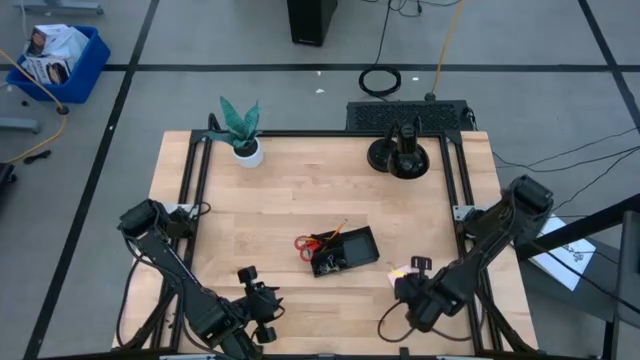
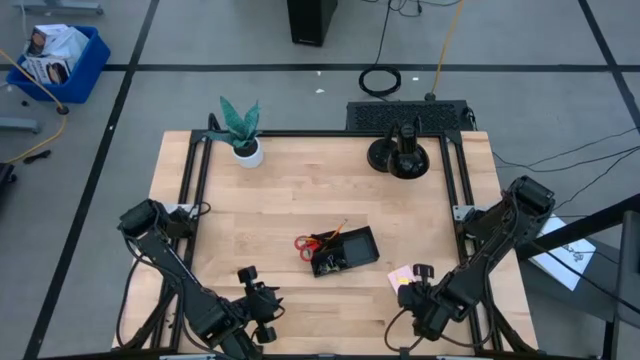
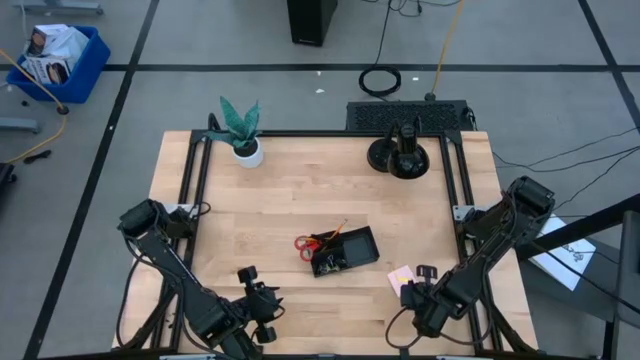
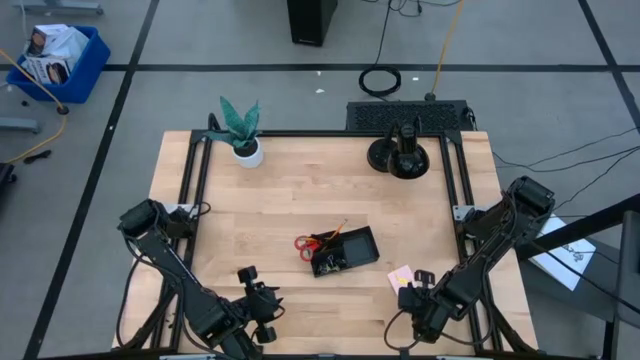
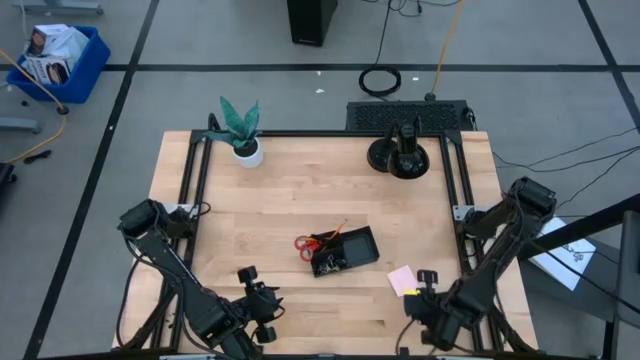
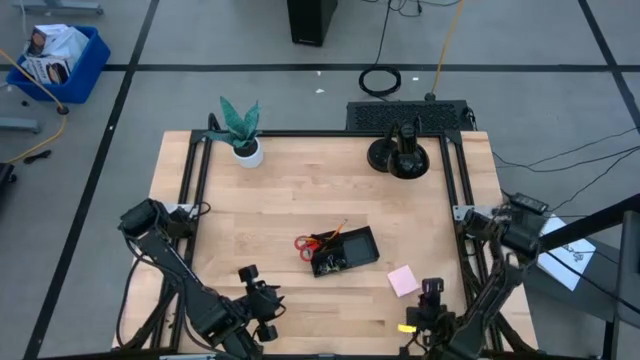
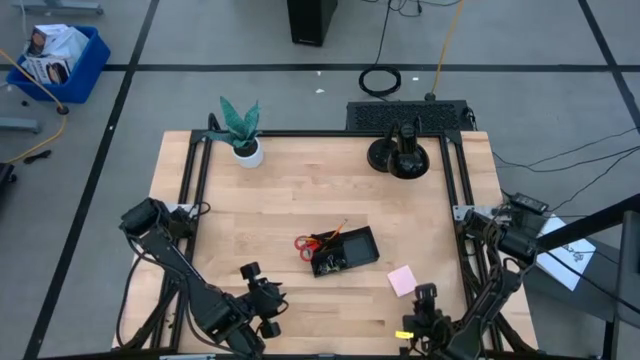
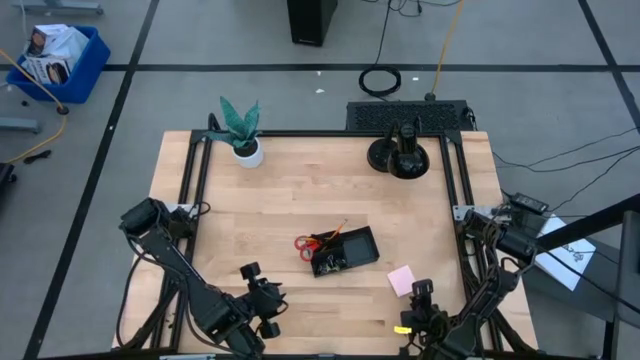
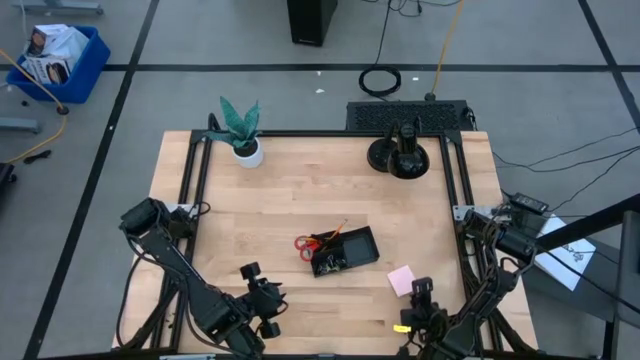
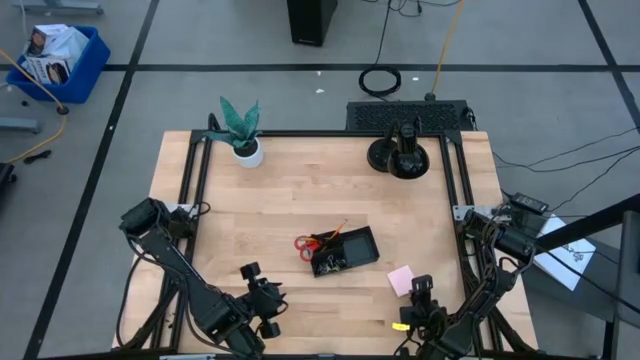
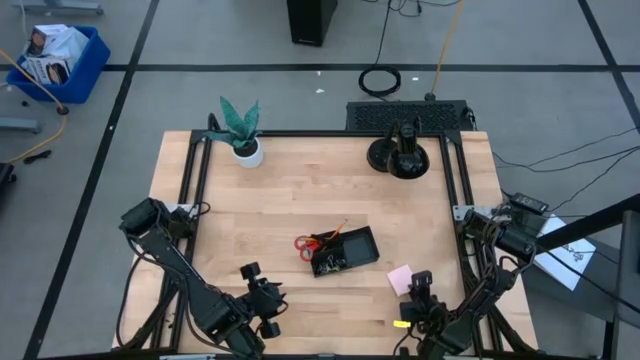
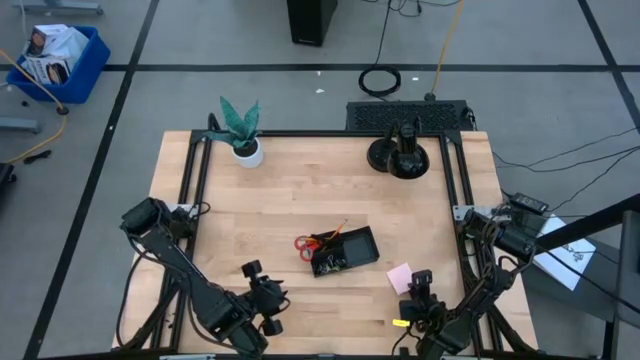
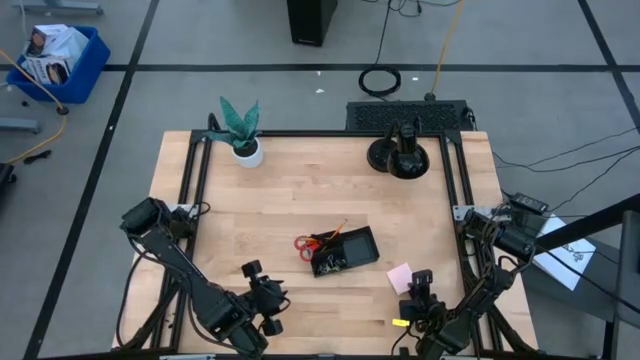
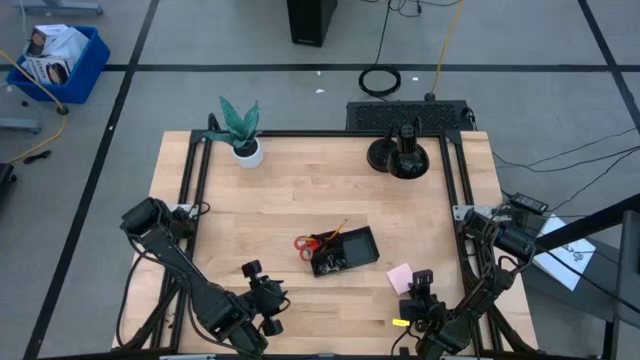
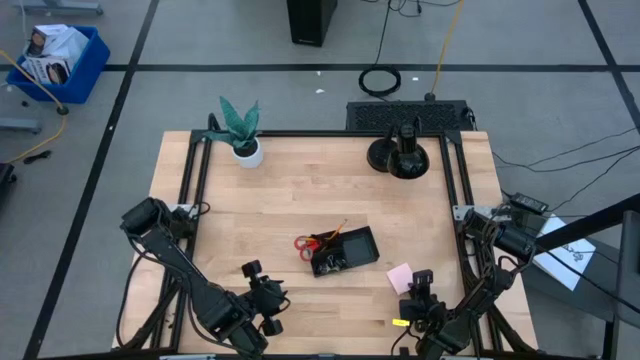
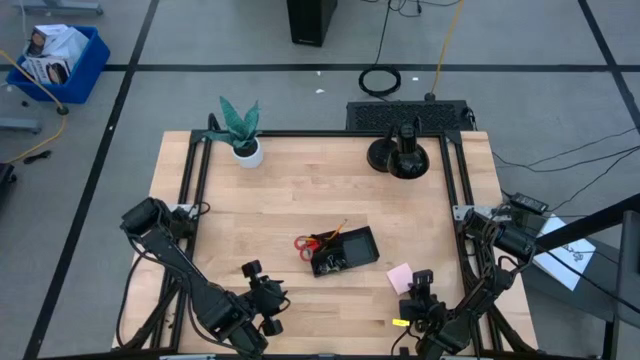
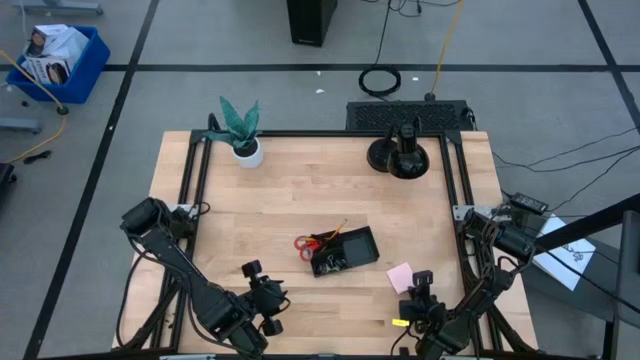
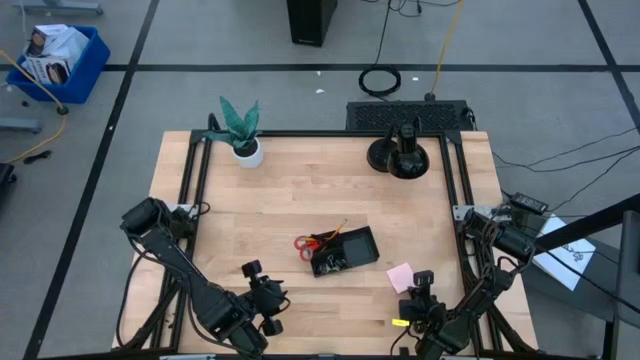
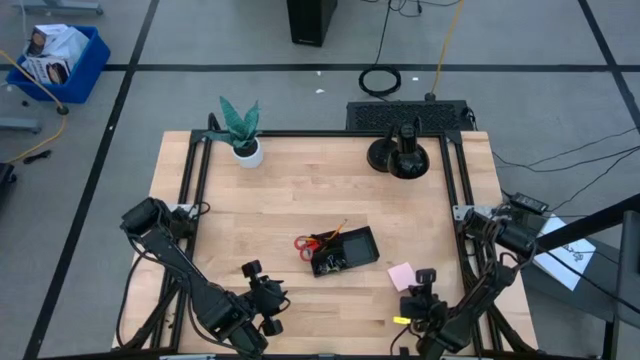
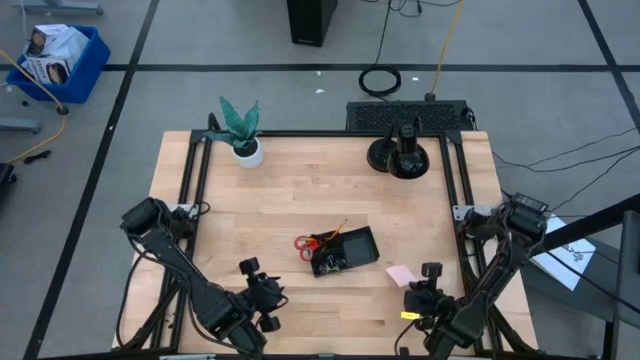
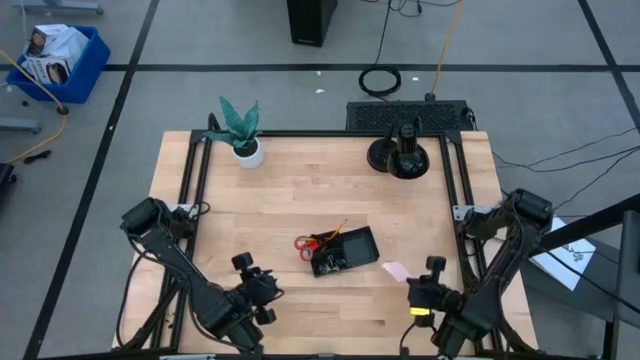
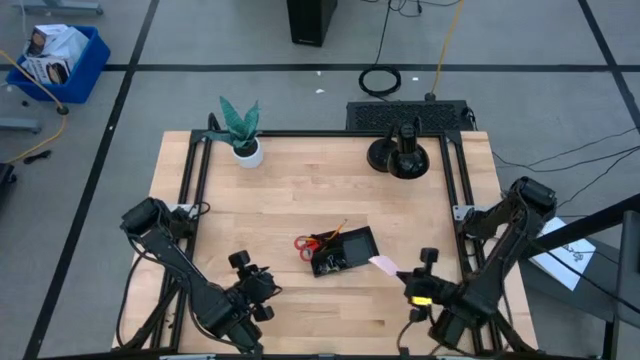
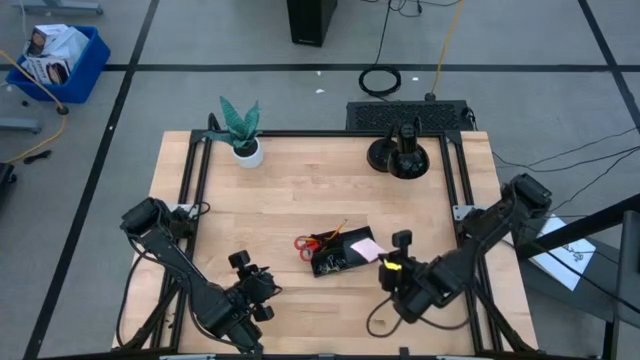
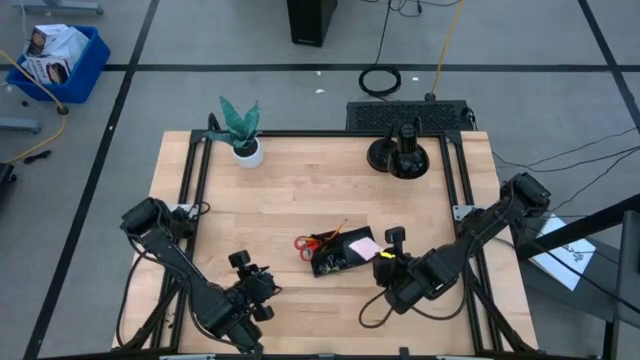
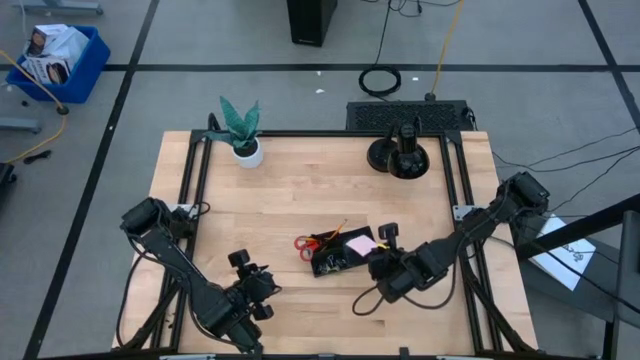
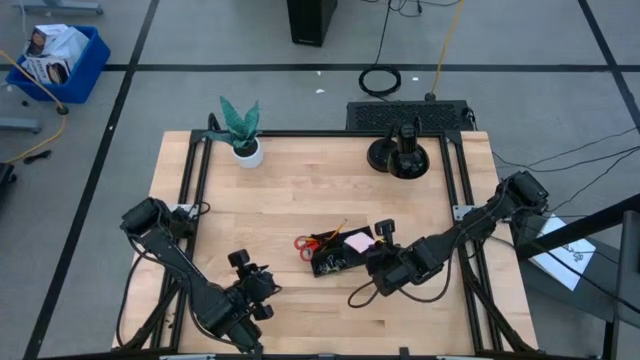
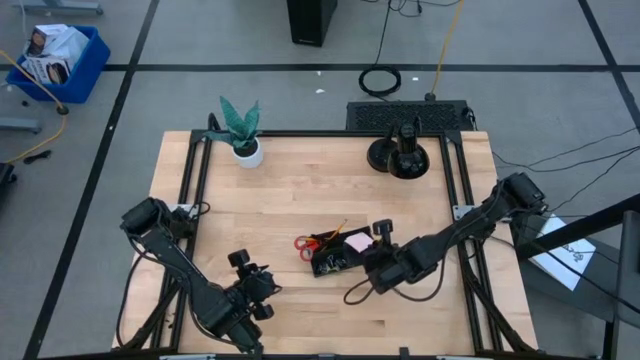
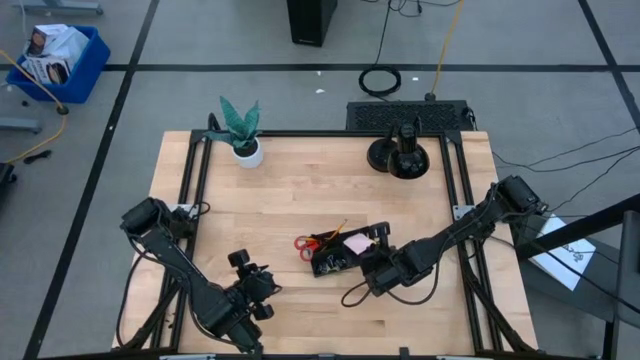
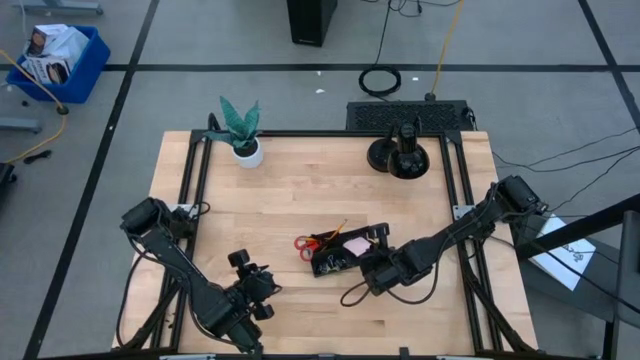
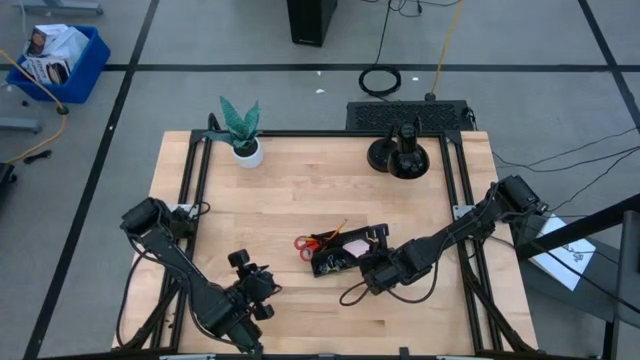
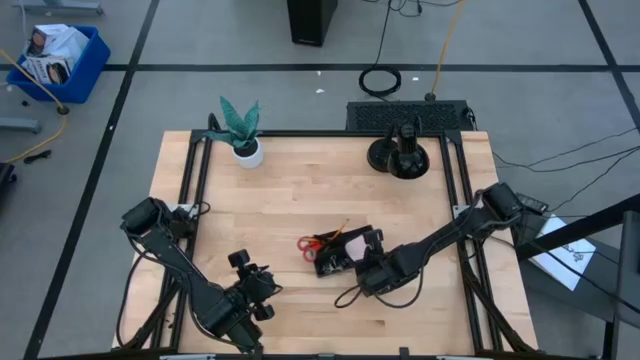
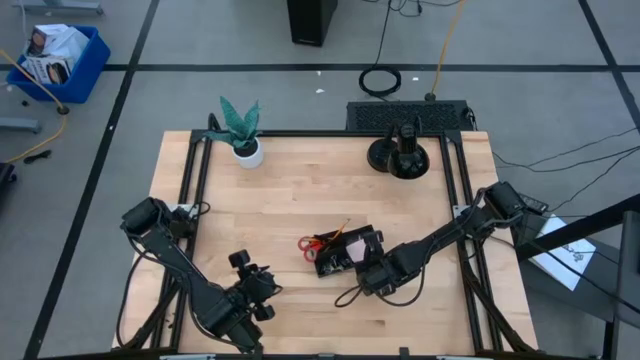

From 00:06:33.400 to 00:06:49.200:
Task: Pick and place office supplies into organizer
Put the purple sticky notes into the black desk organizer

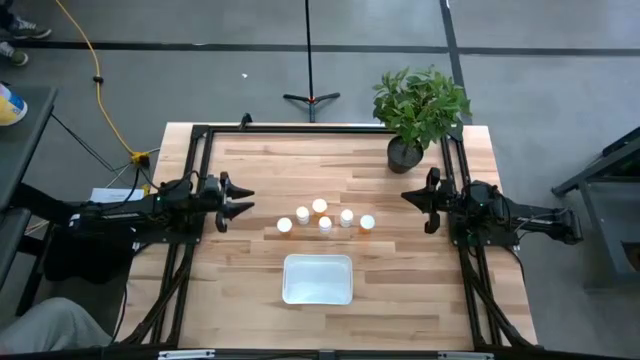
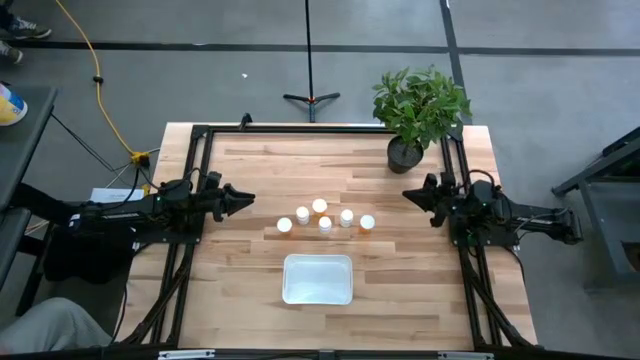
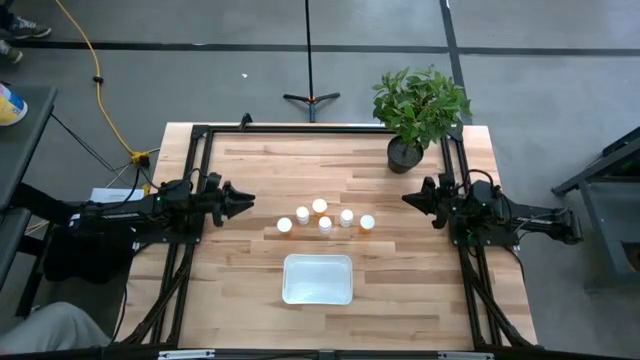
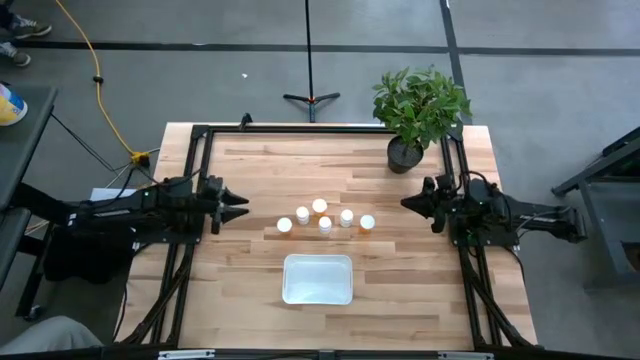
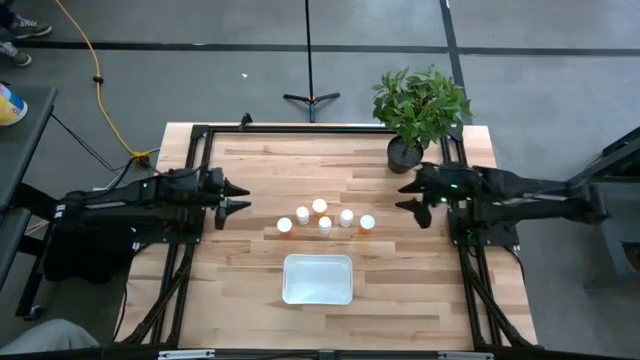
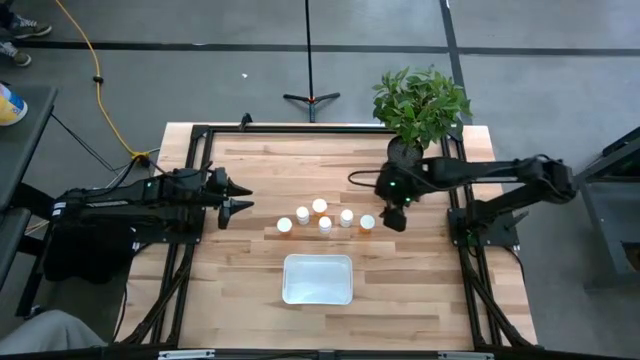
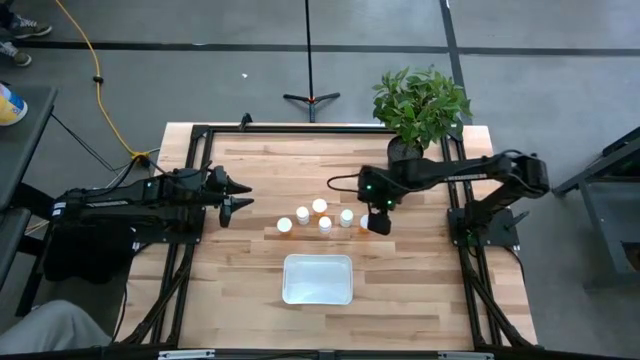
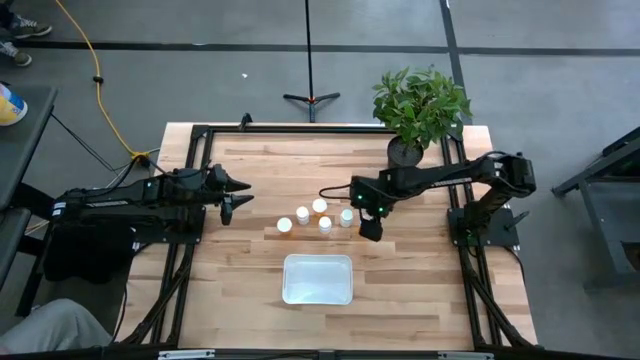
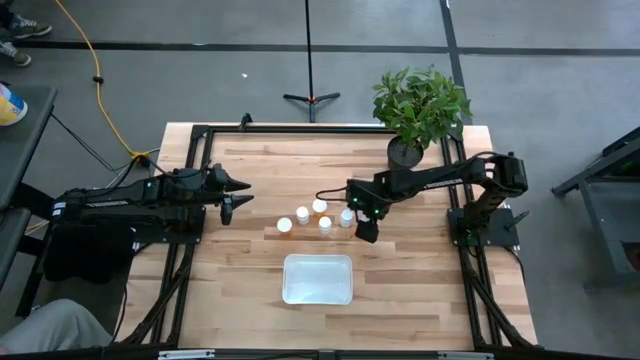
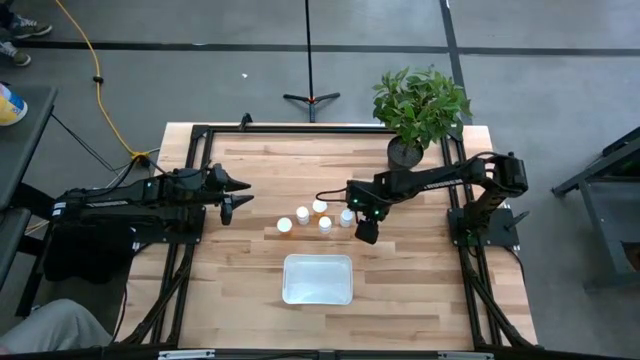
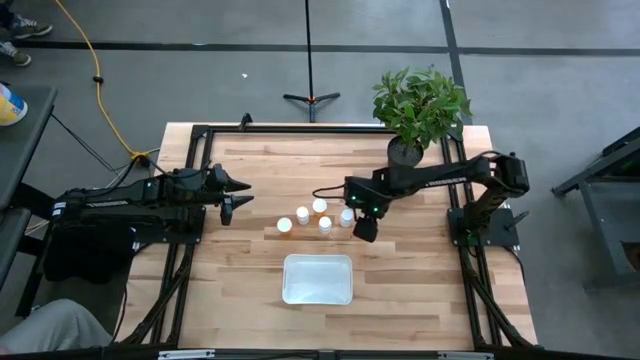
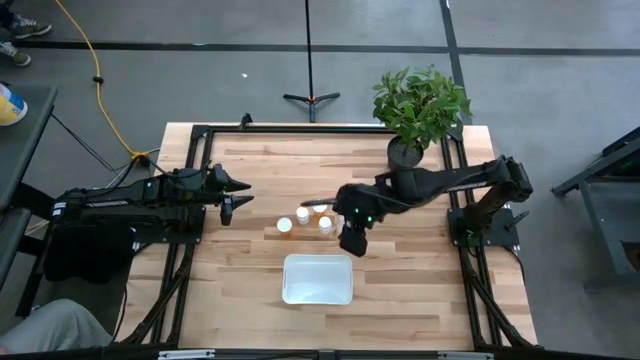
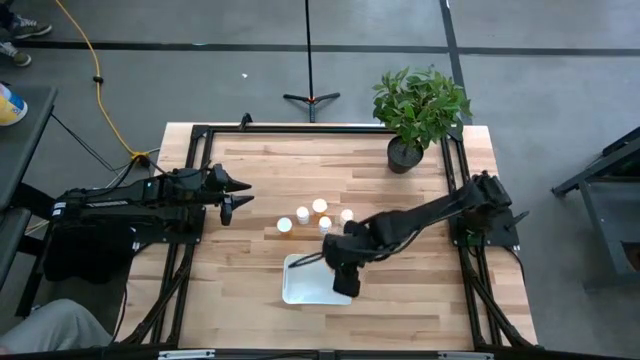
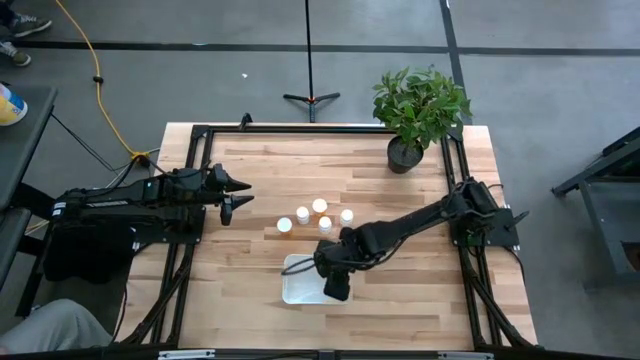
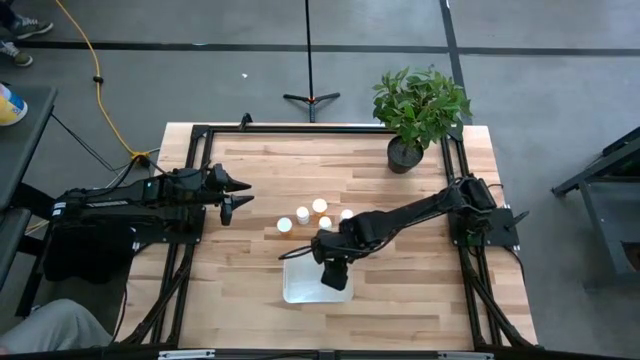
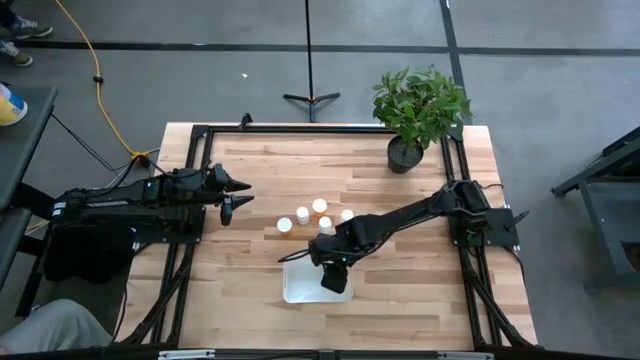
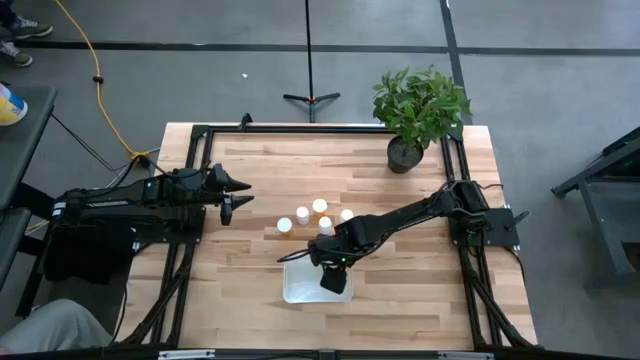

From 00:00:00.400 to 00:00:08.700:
Task: Pick and place pill bottles into a basket
Put the right orange pill bottle into the white bin
